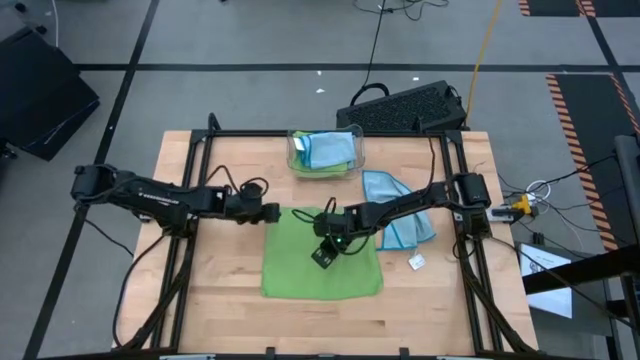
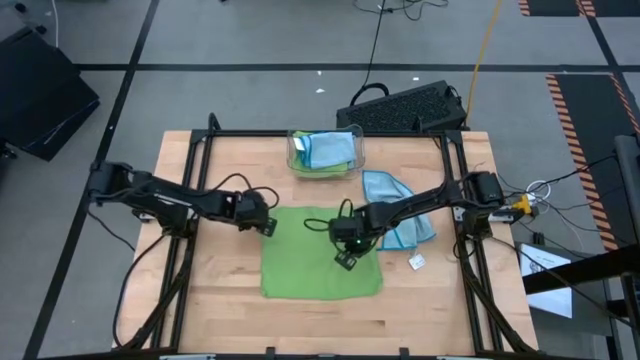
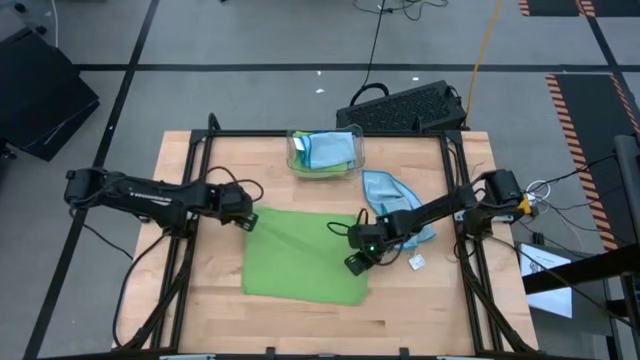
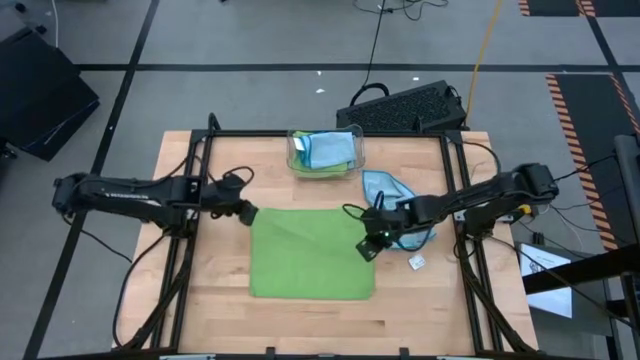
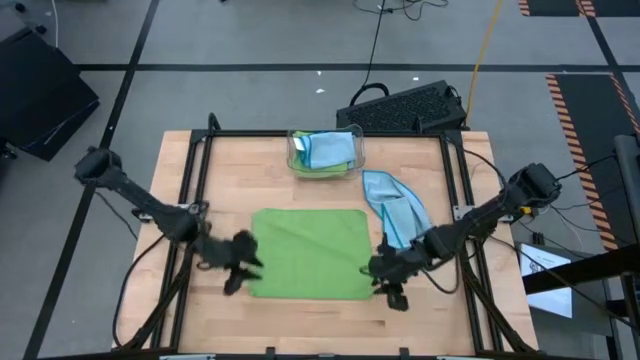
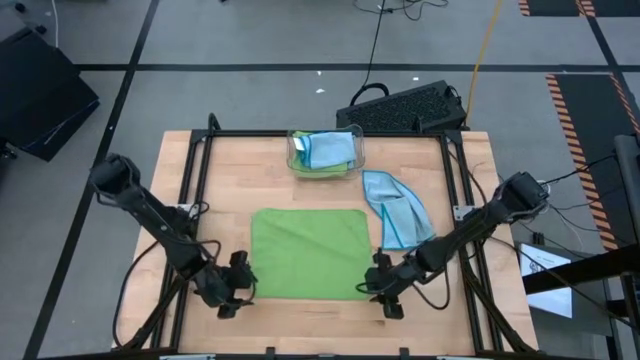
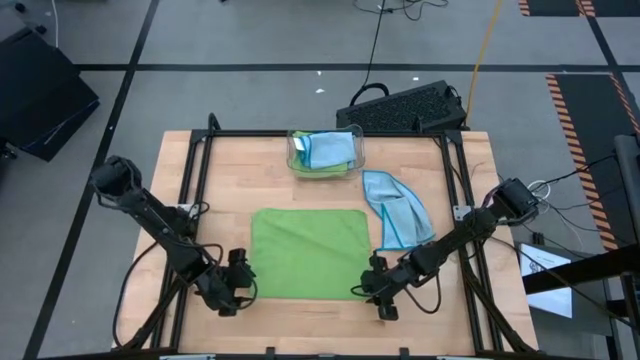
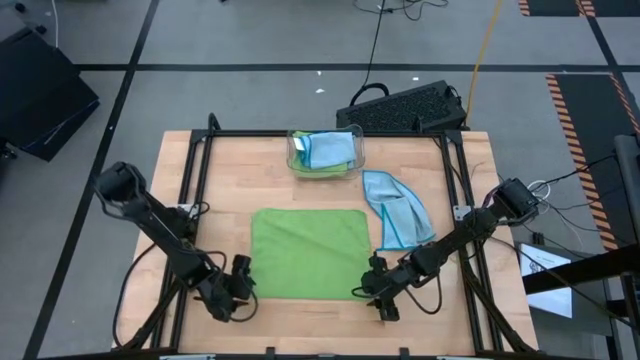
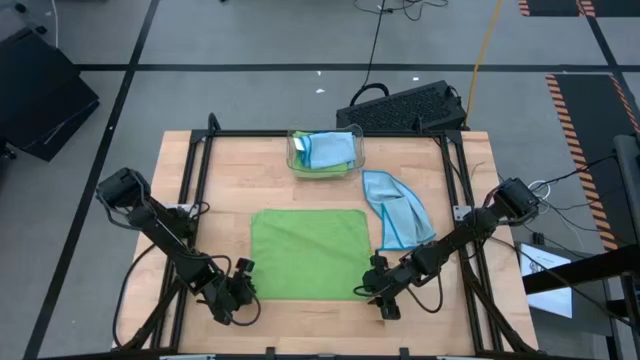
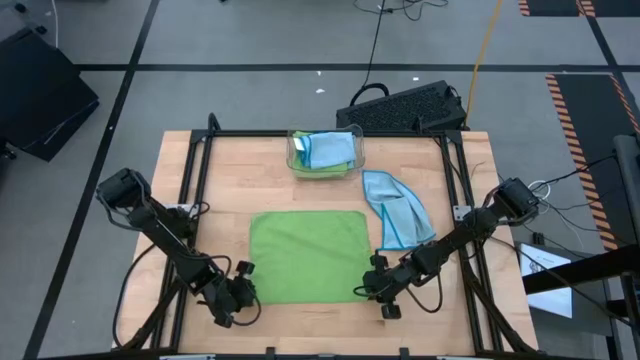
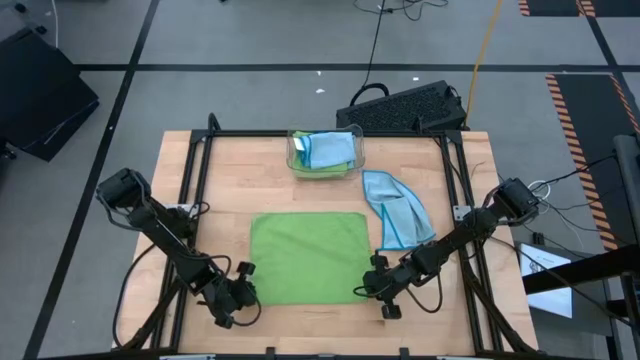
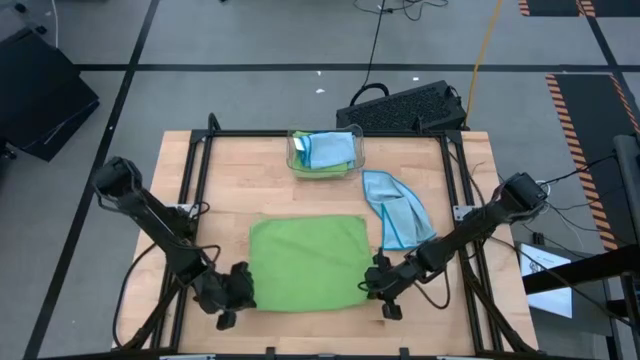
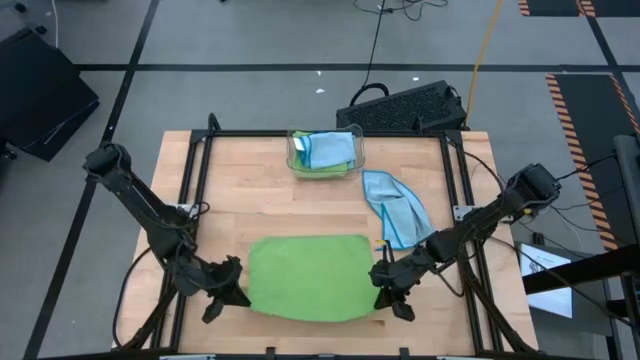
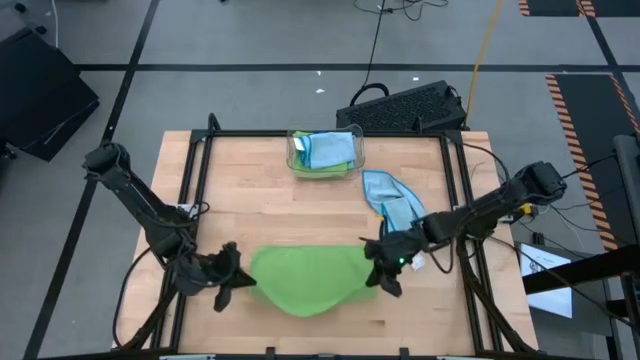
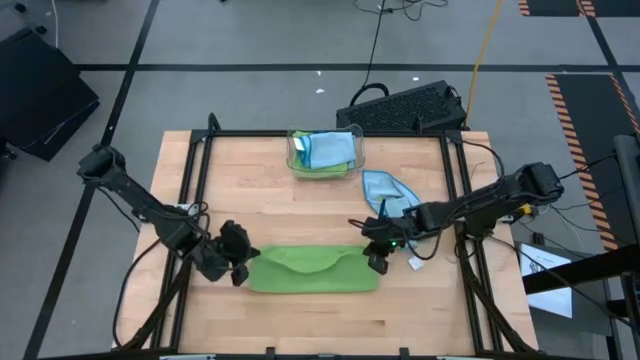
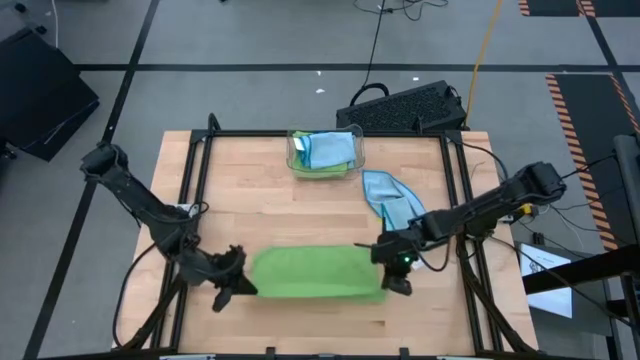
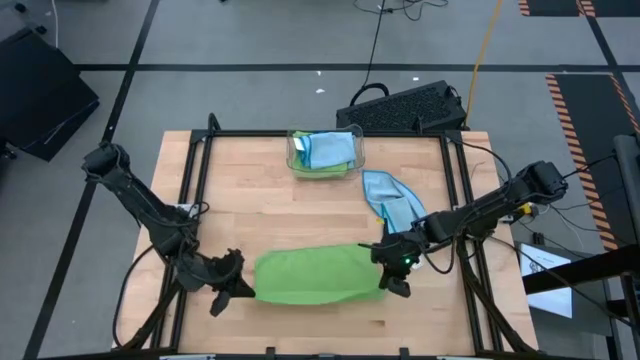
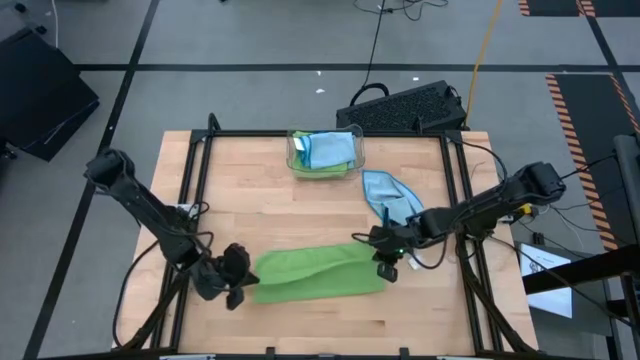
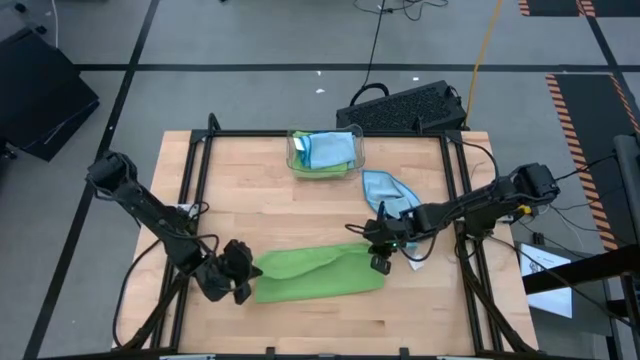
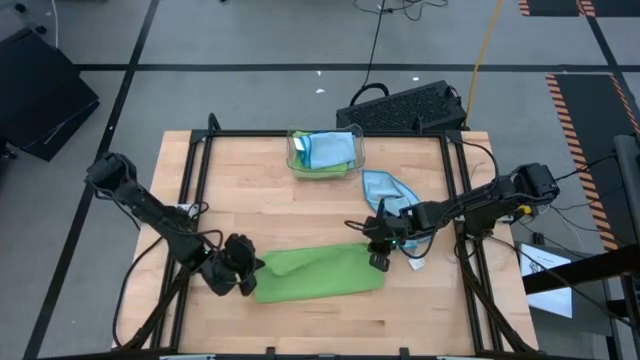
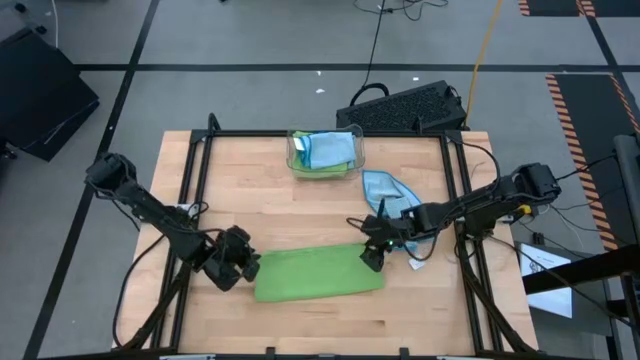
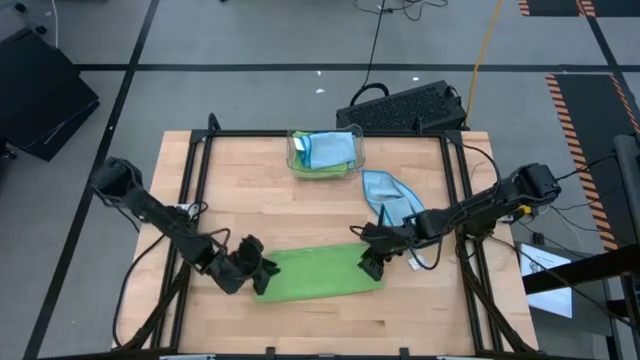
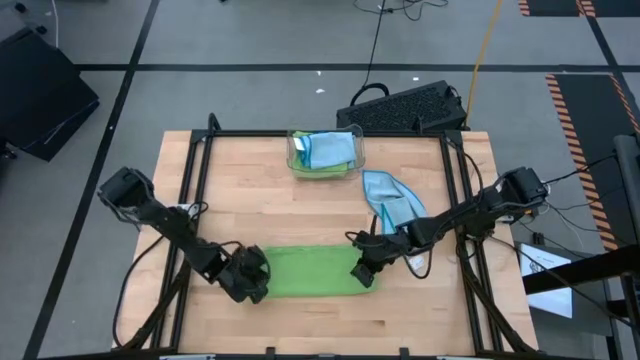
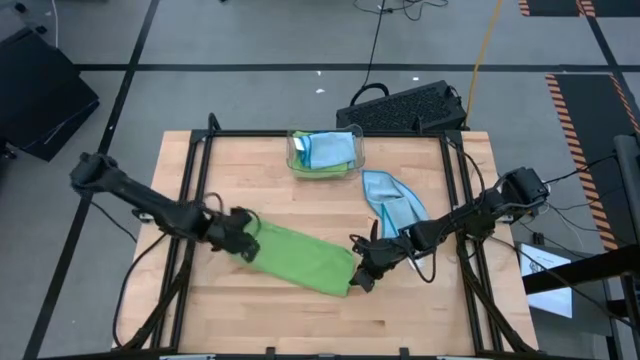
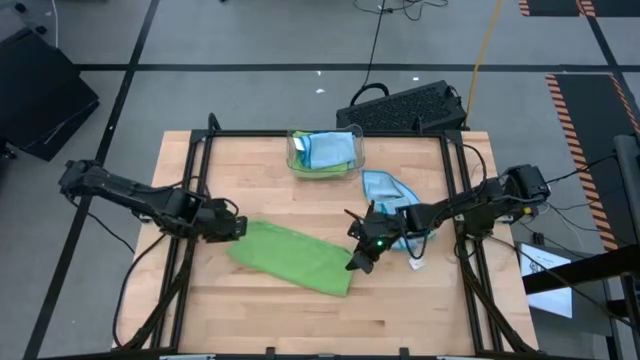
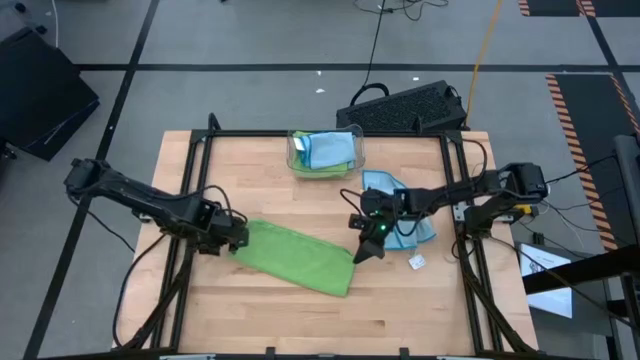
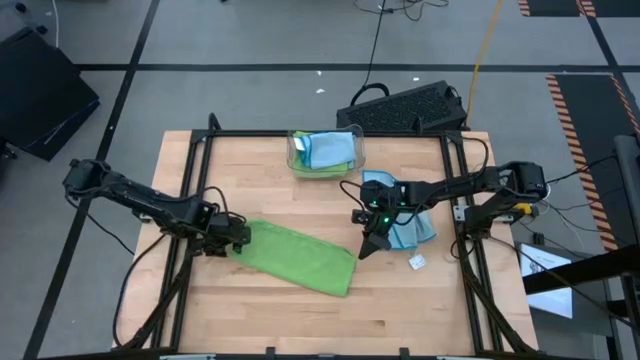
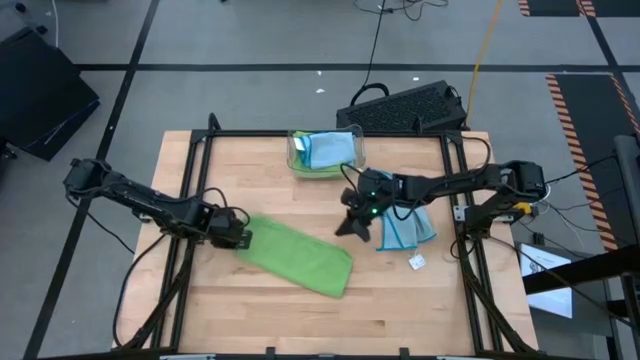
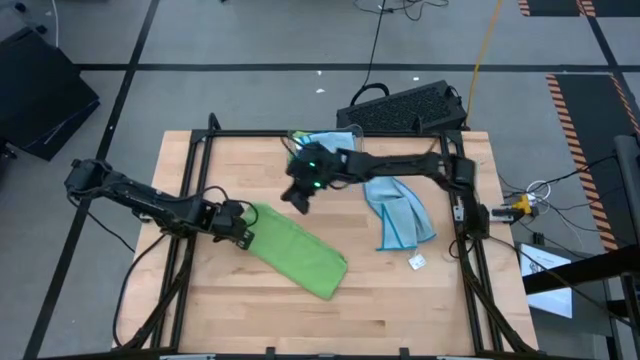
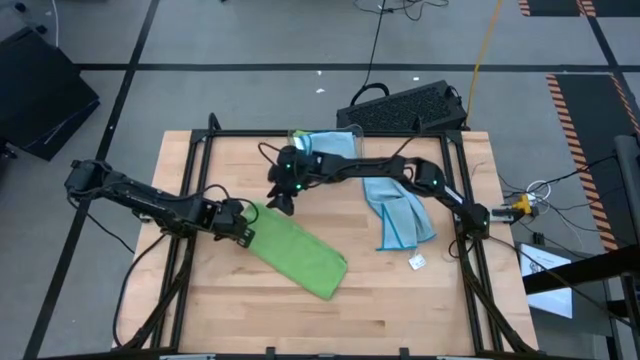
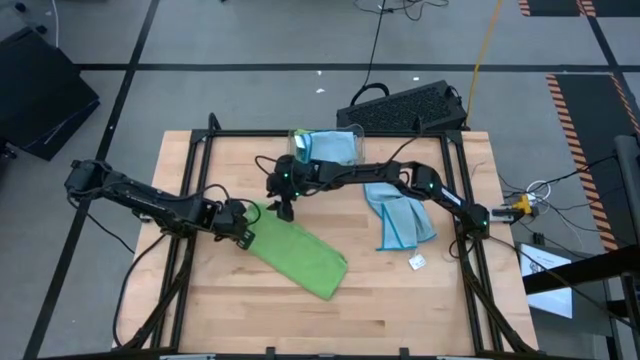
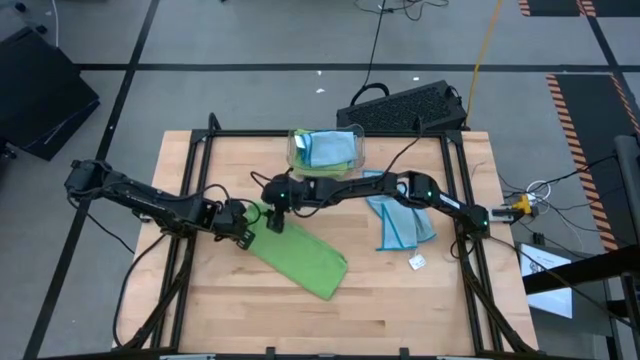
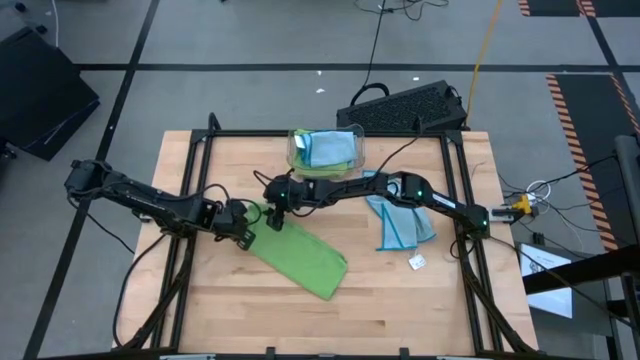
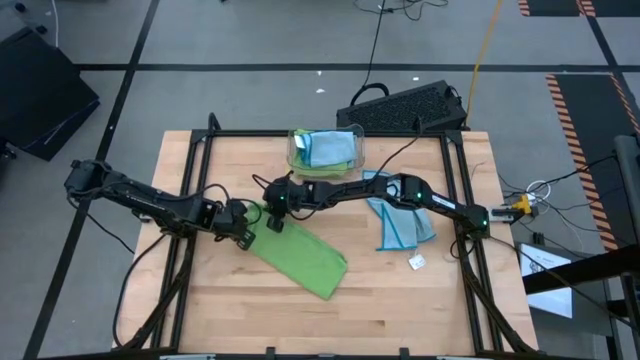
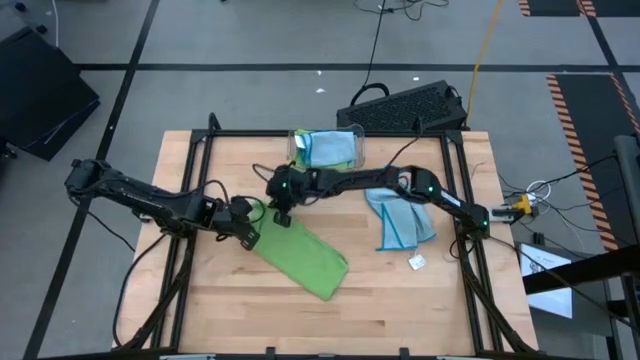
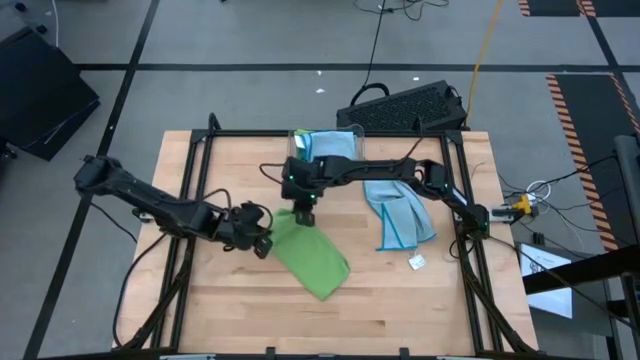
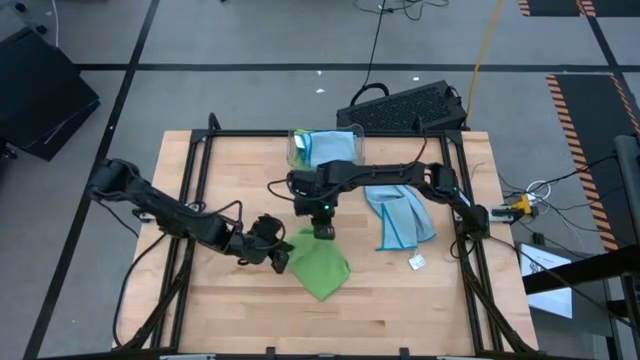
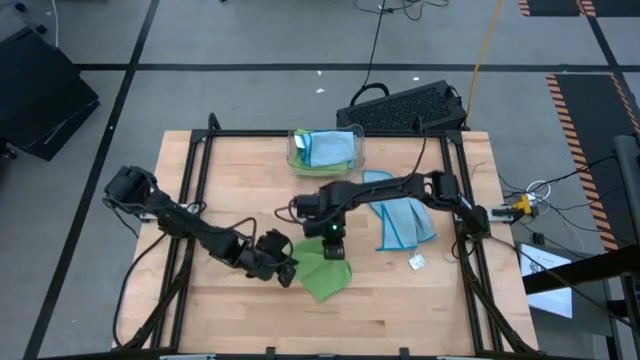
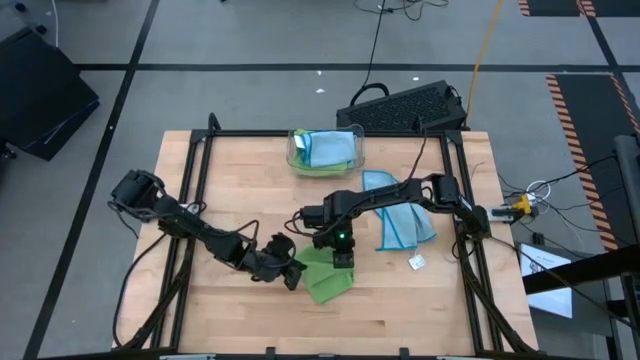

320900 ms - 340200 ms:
Task: Fold microfiber towels
Fold the green microfiber cloth

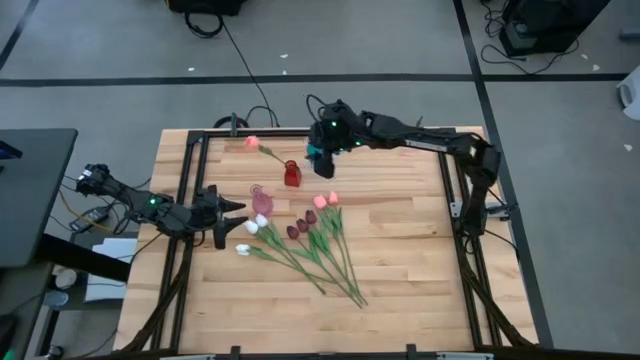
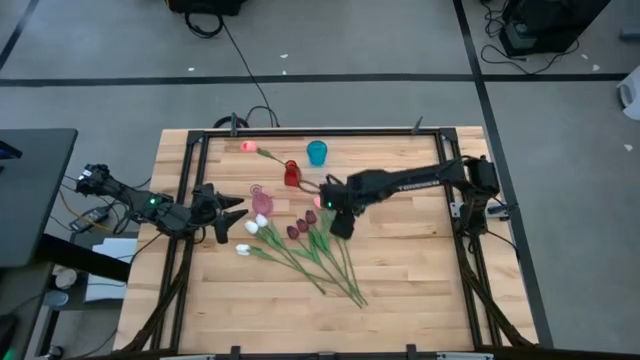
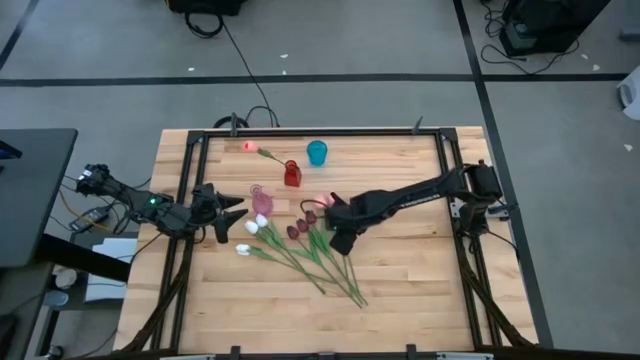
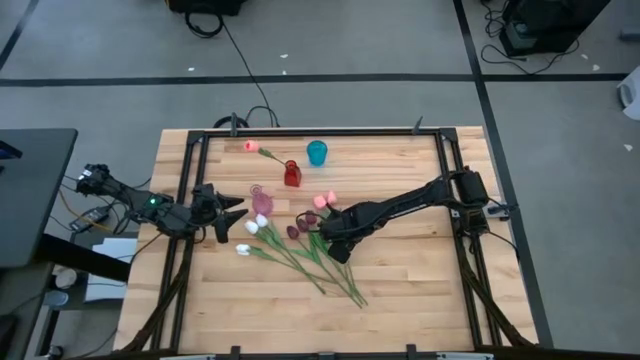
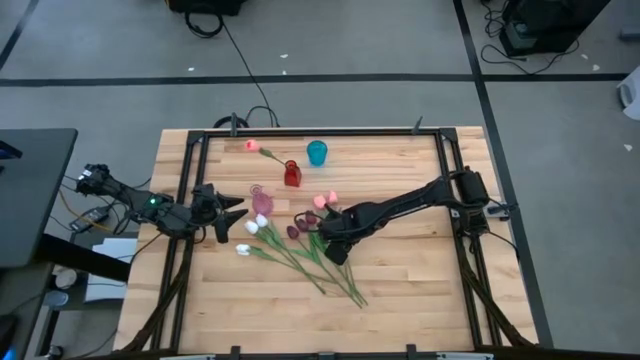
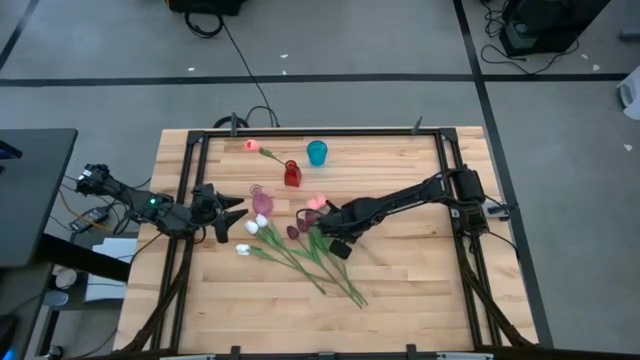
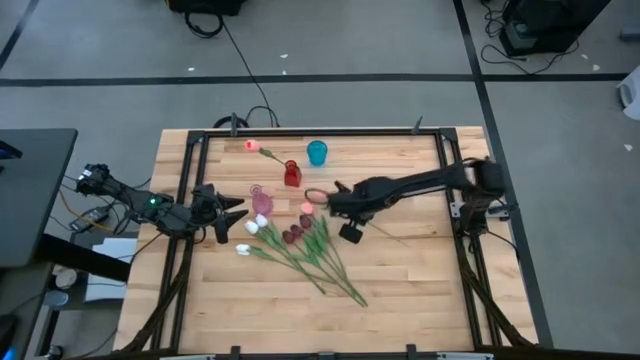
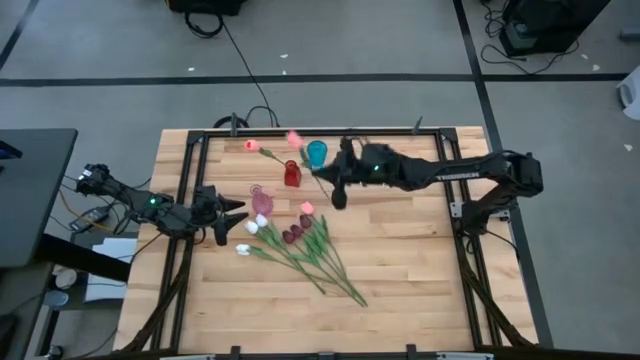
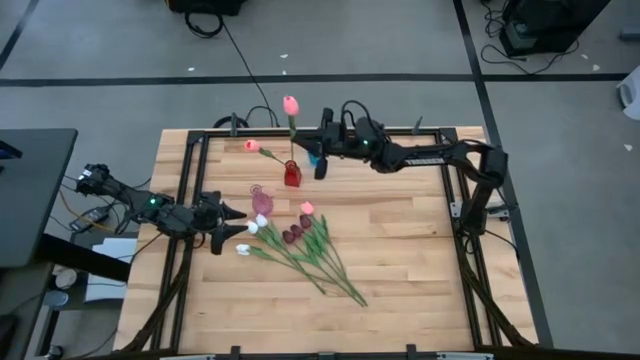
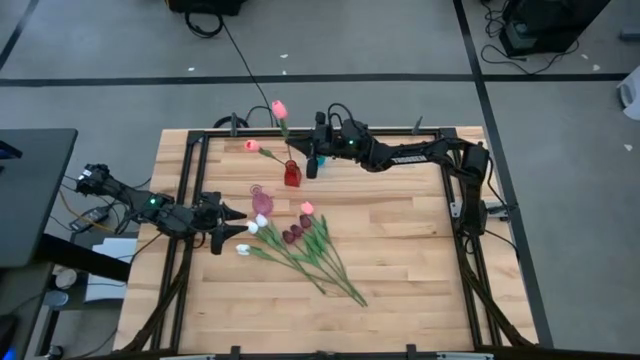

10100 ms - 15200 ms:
Task: Sort flowers into vase by color
Put the pink tulip into the red vase
